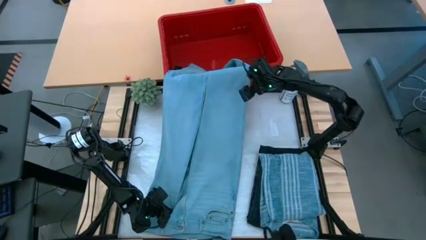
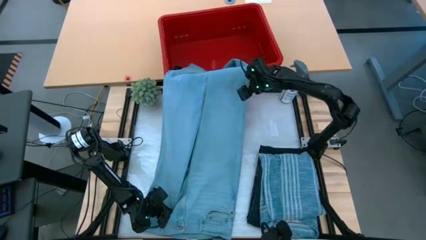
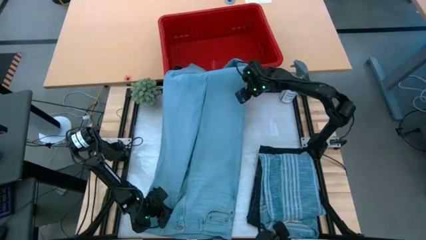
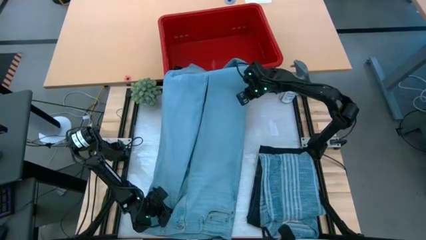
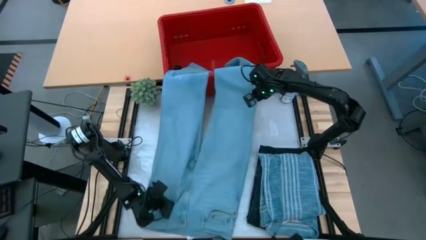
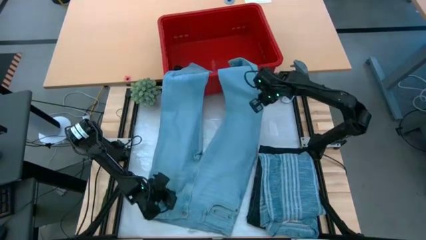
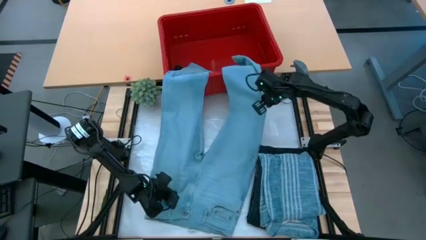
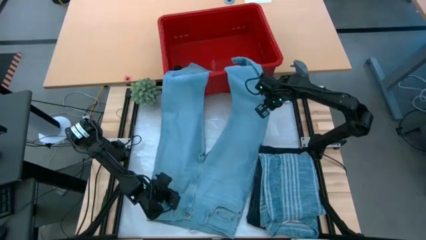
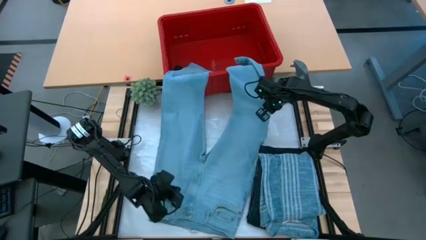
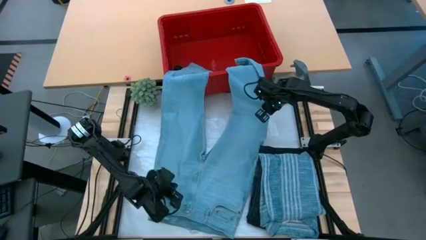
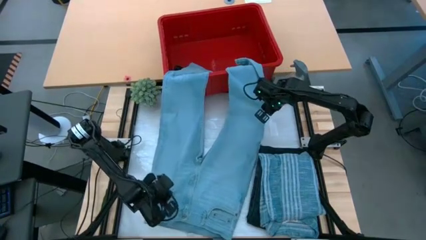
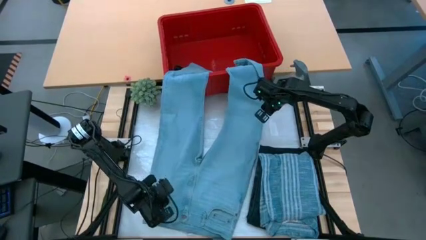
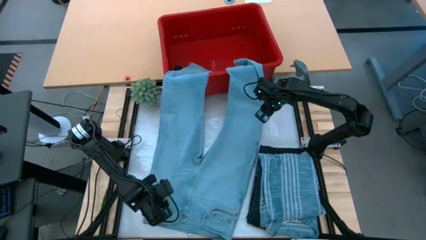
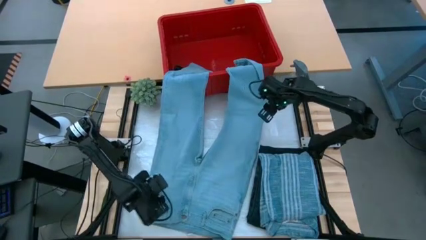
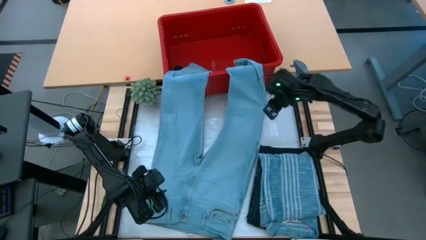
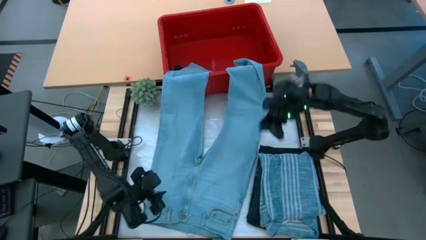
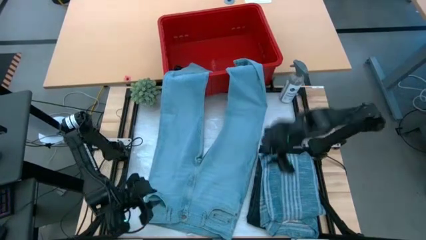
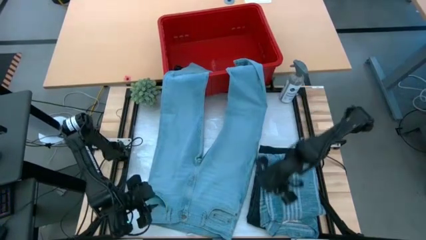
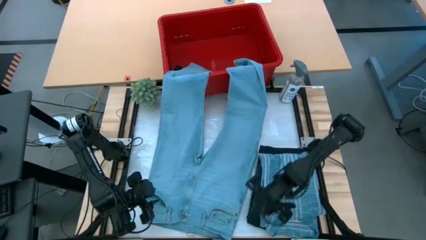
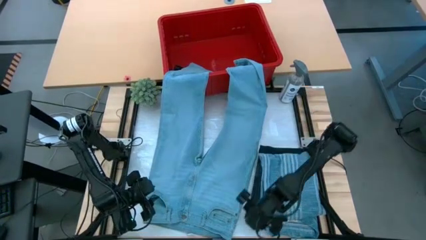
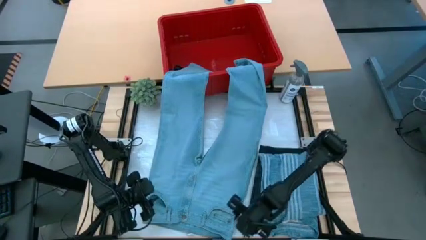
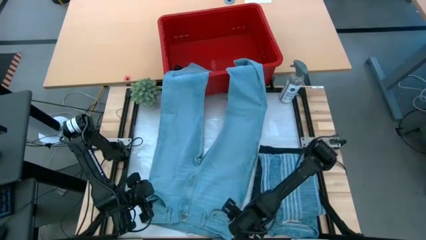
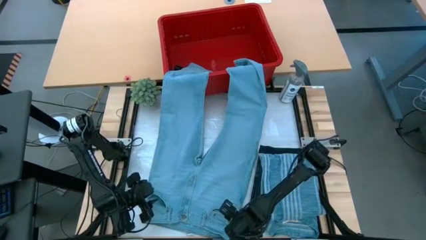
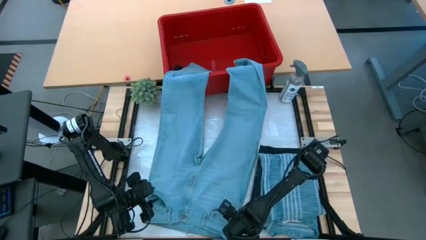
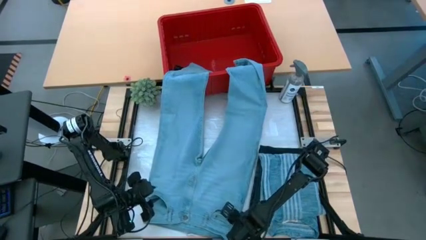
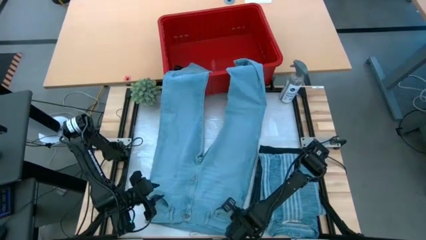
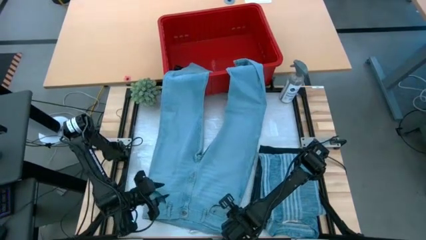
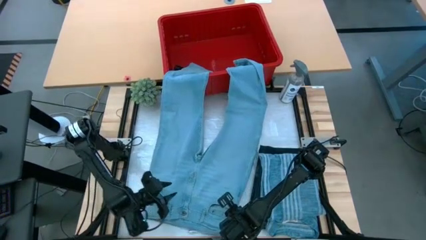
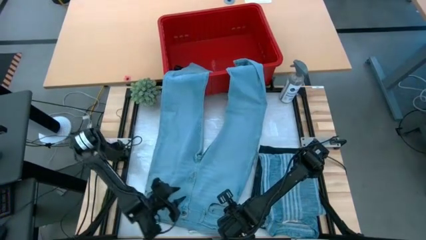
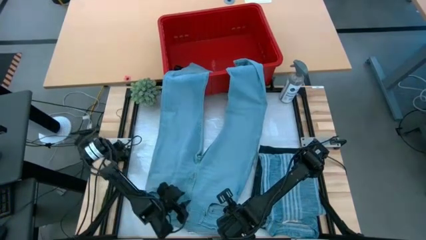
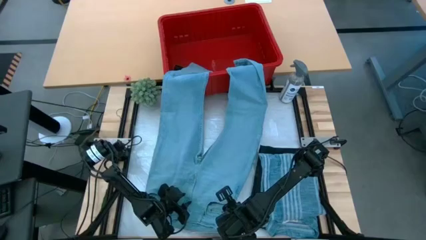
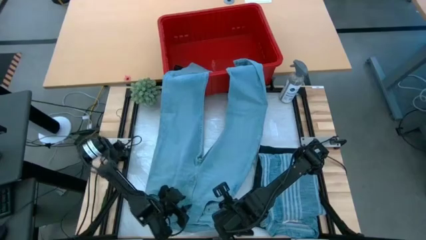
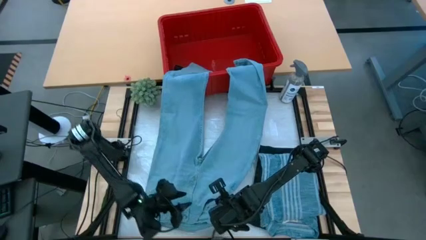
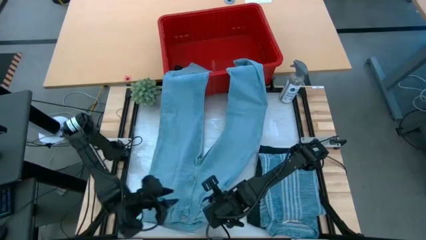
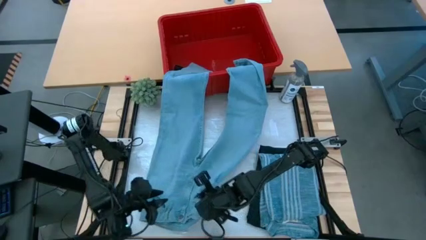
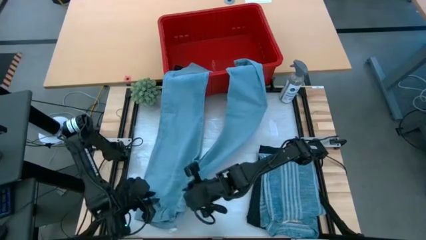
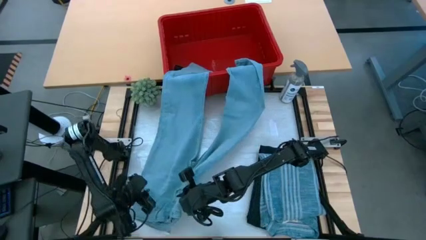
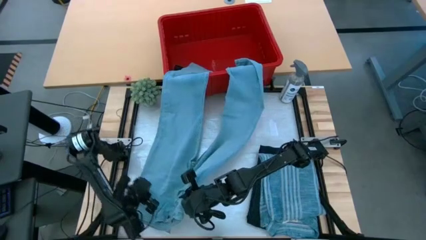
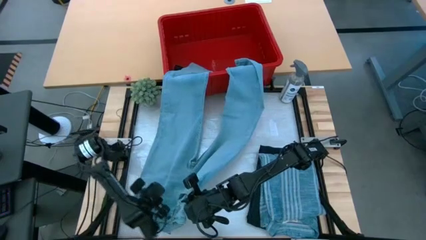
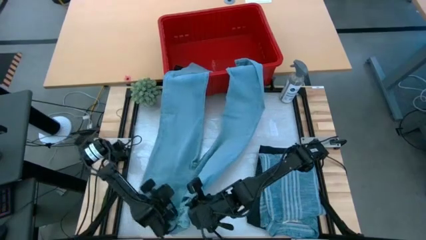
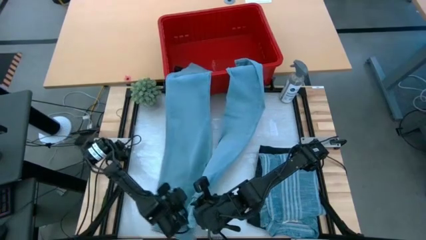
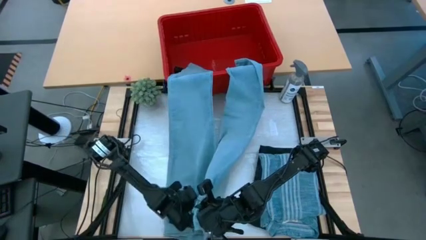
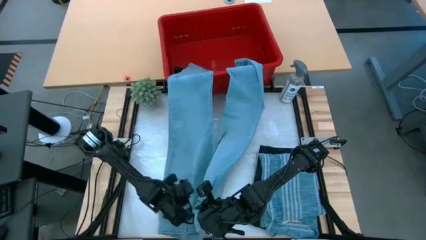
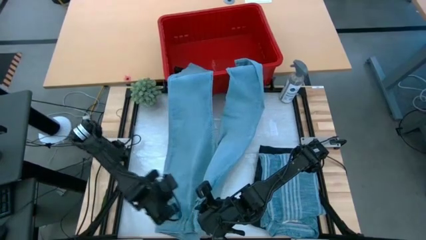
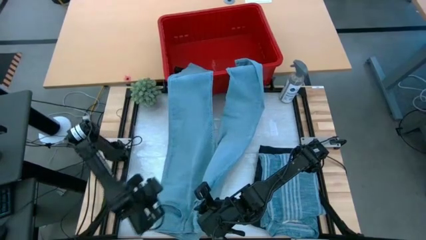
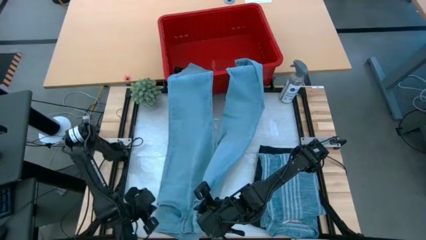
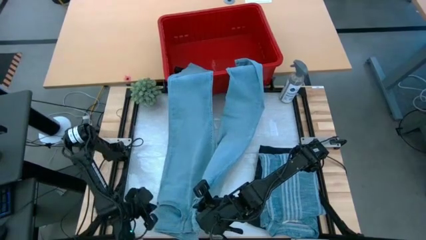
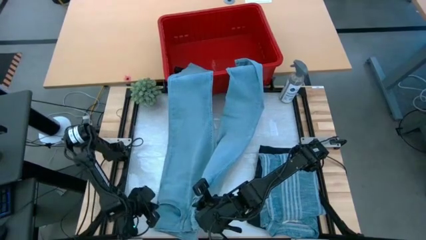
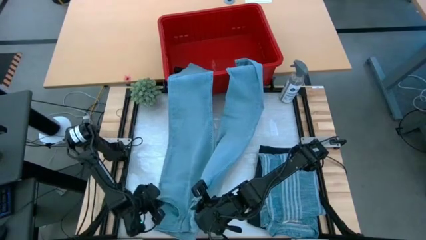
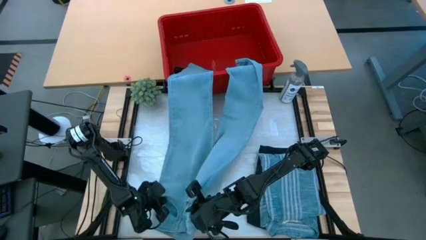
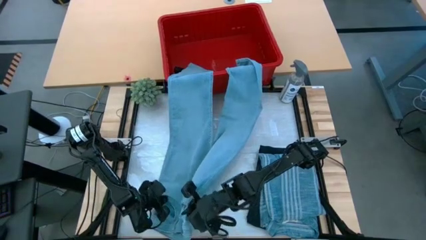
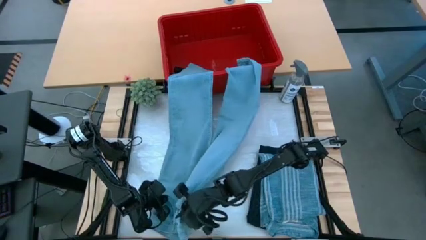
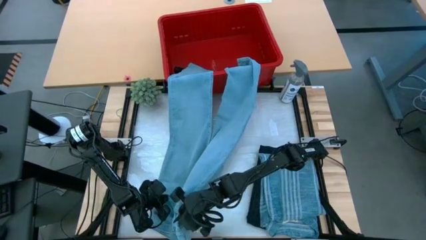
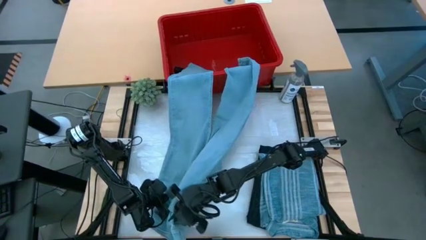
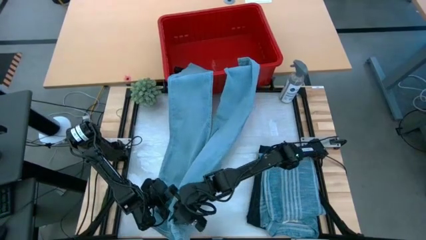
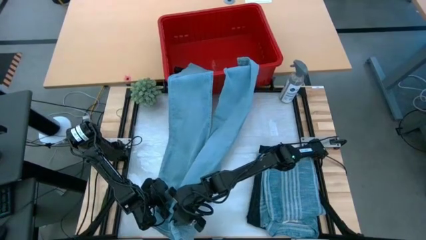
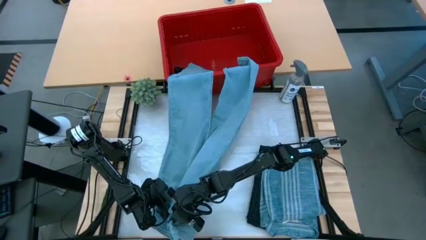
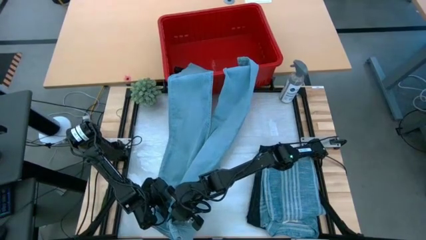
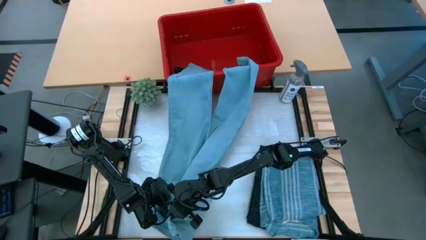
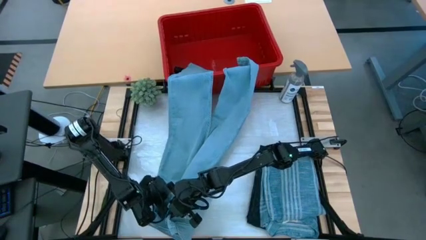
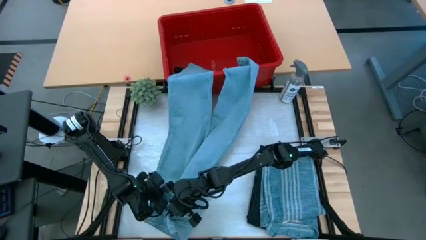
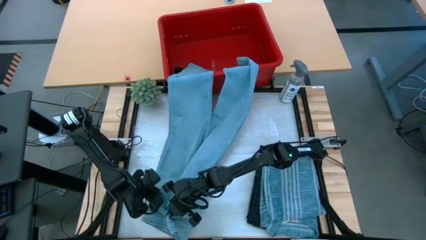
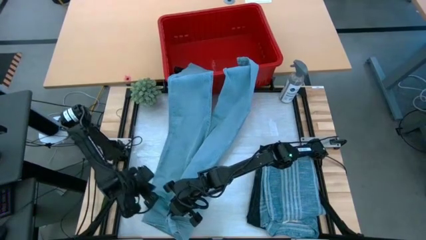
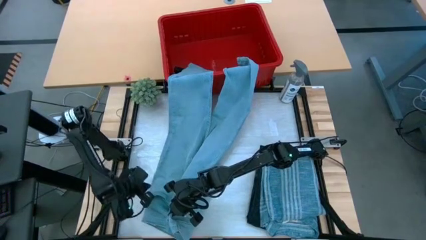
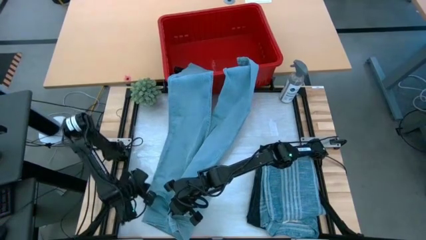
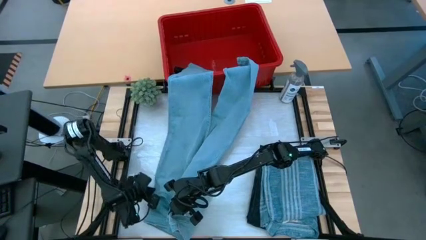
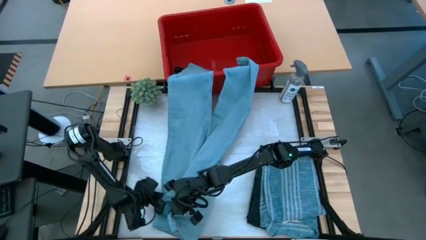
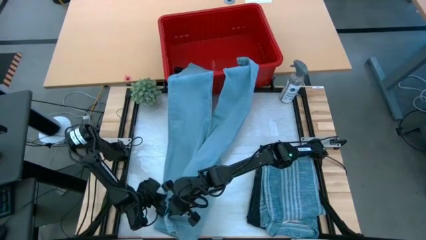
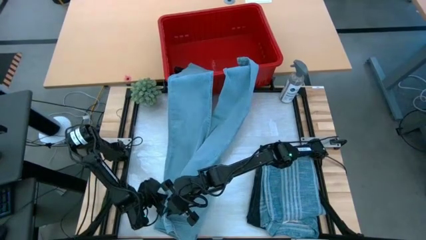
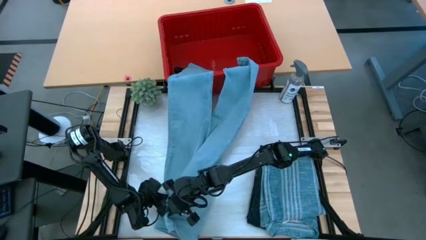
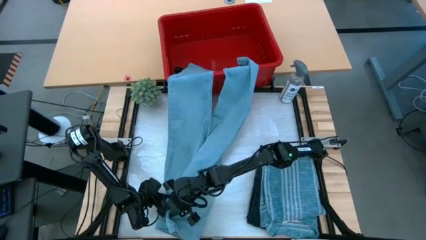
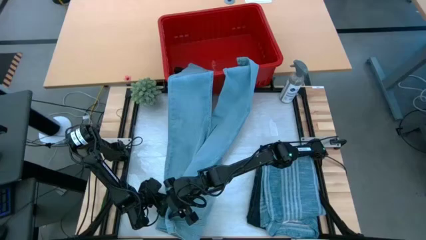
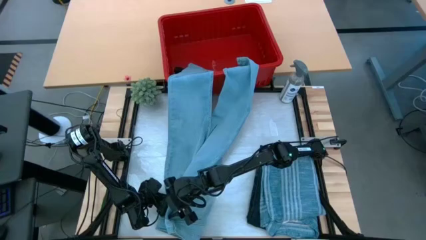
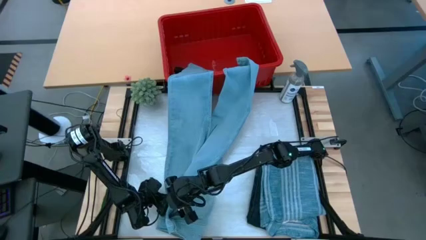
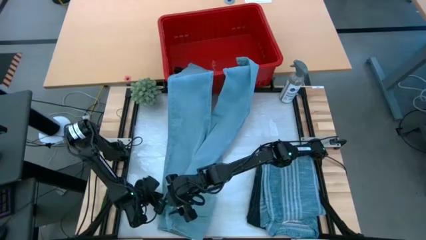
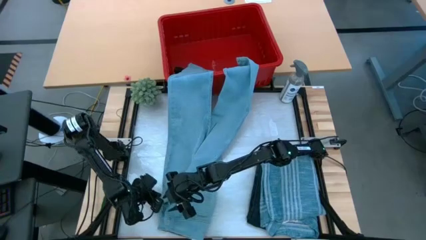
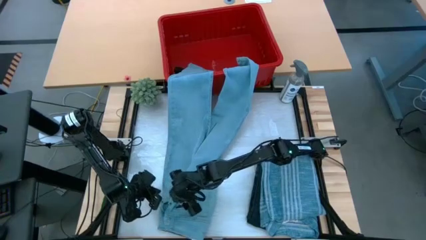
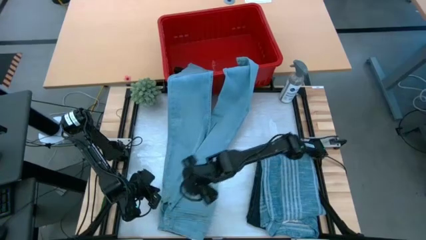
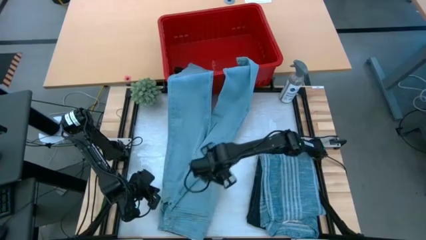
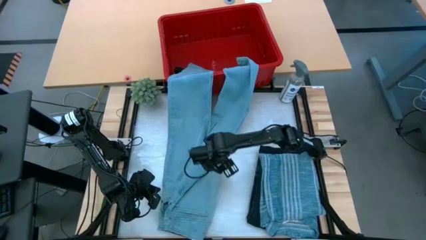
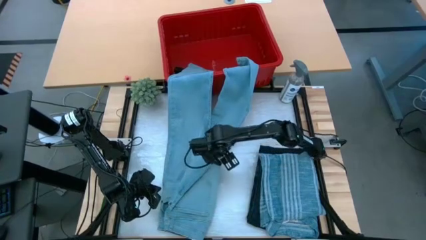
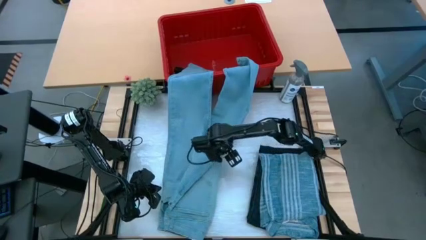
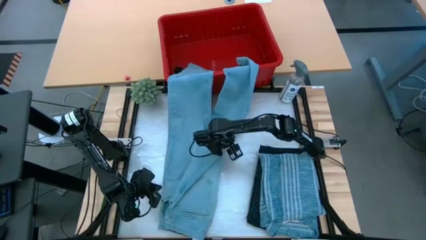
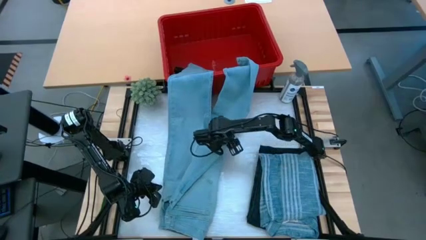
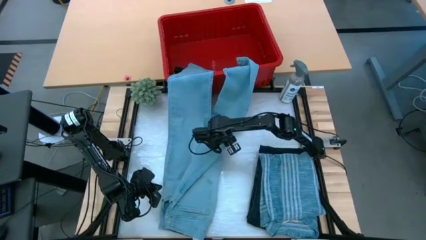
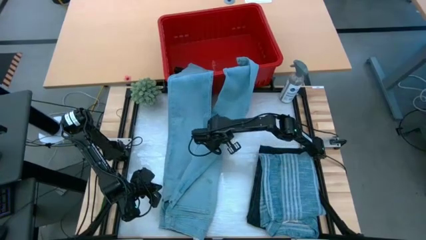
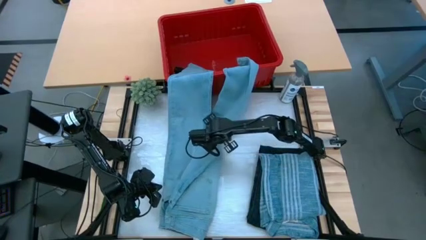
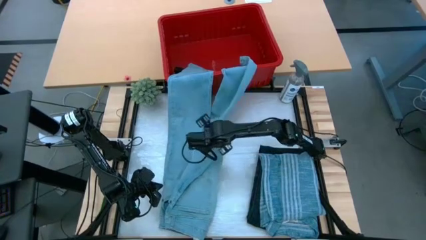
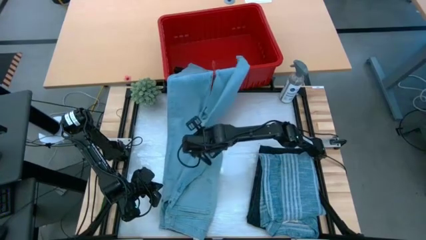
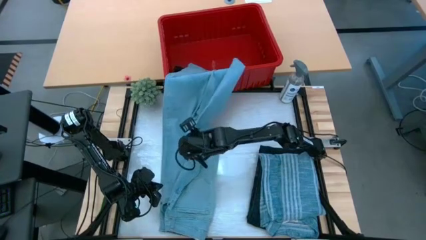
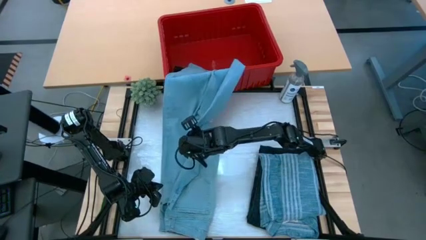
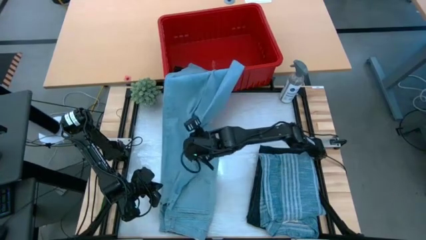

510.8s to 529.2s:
Task: Fold Laundry from Bin
Fold the light blue denim pants
